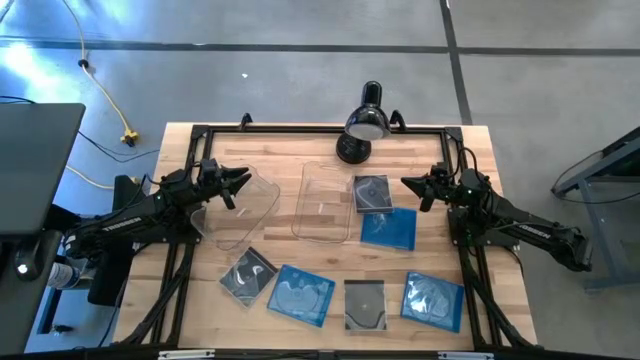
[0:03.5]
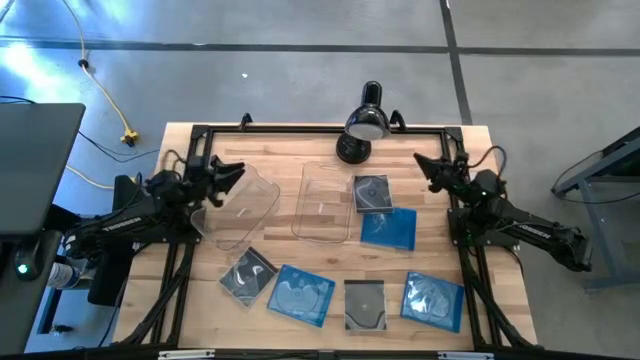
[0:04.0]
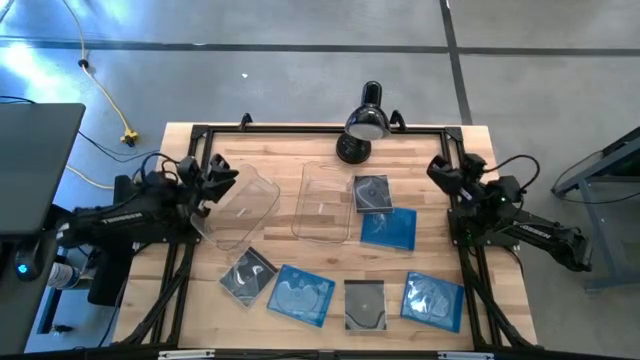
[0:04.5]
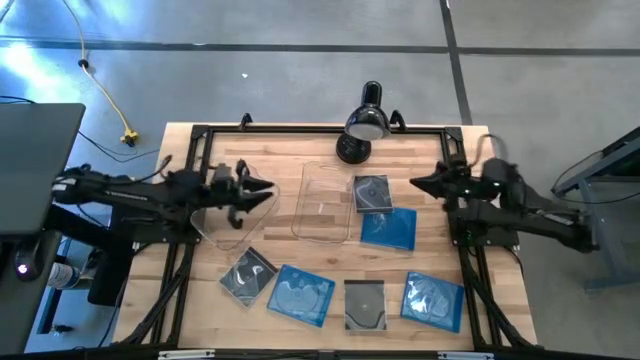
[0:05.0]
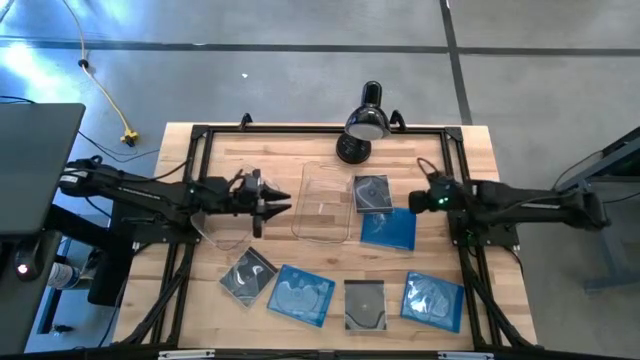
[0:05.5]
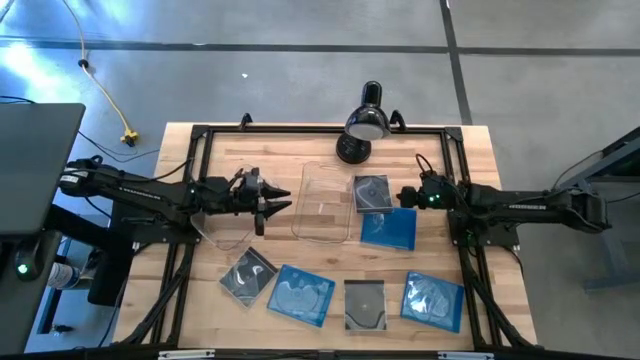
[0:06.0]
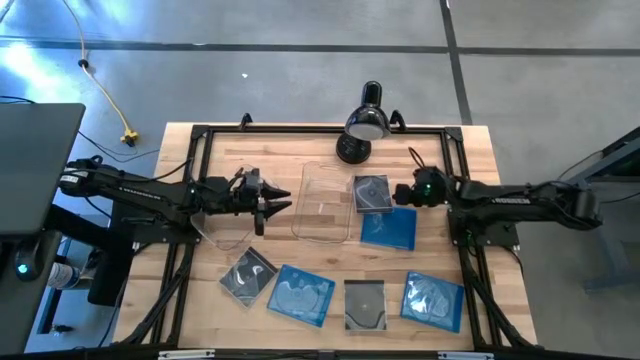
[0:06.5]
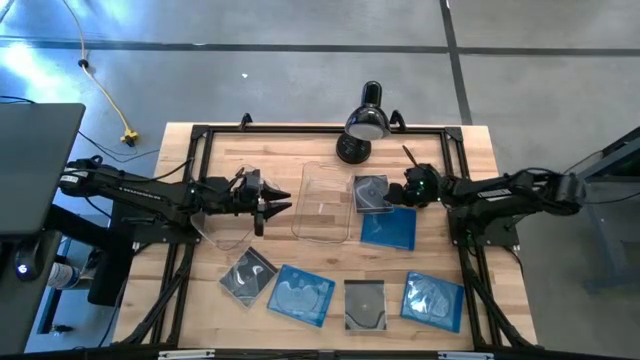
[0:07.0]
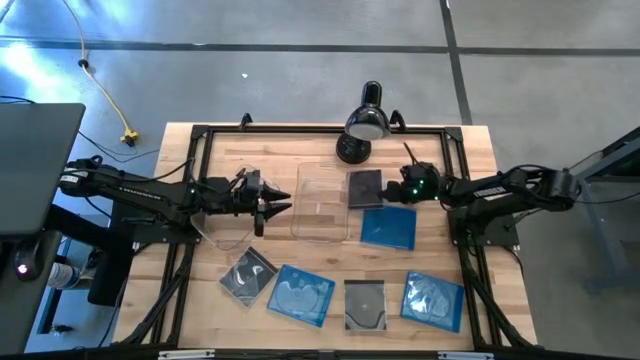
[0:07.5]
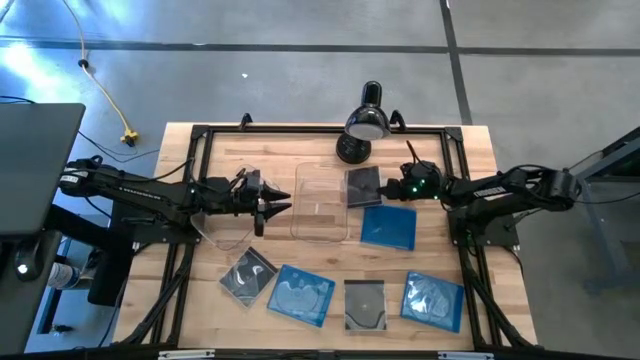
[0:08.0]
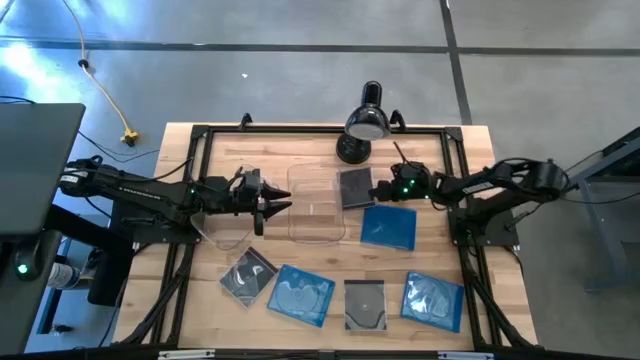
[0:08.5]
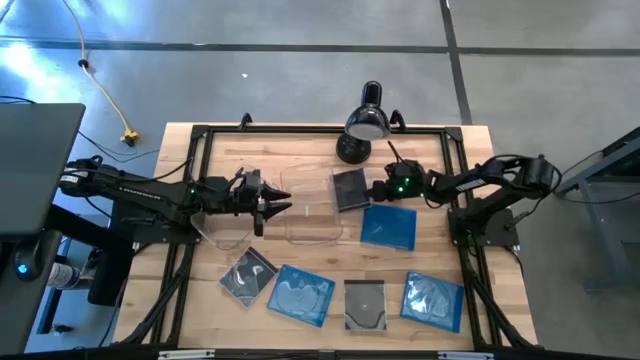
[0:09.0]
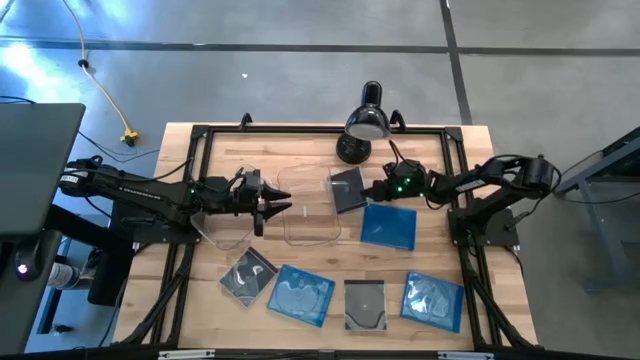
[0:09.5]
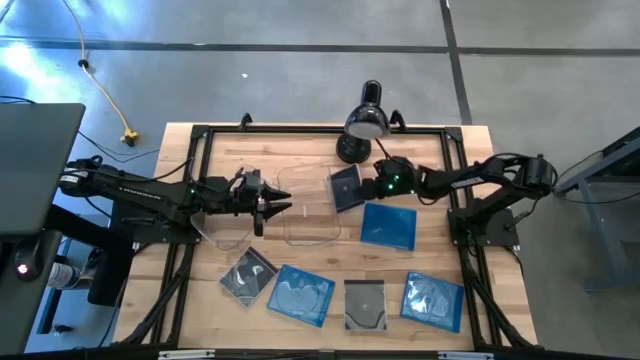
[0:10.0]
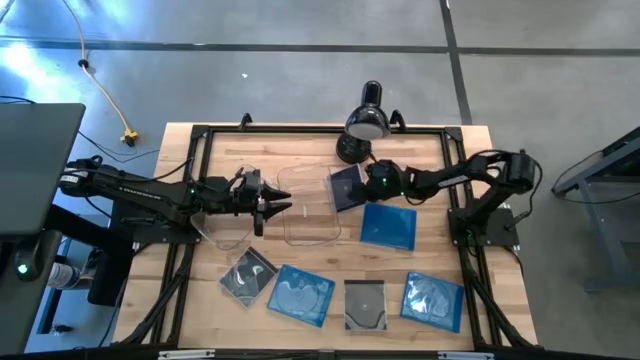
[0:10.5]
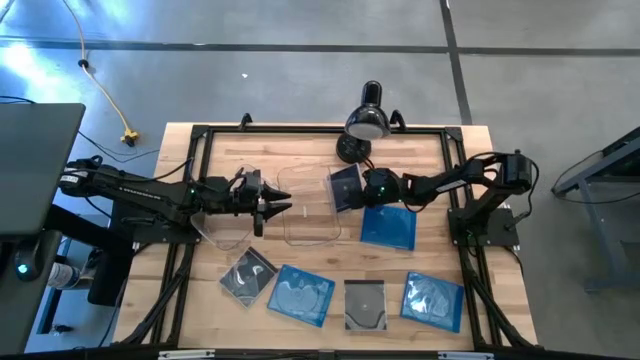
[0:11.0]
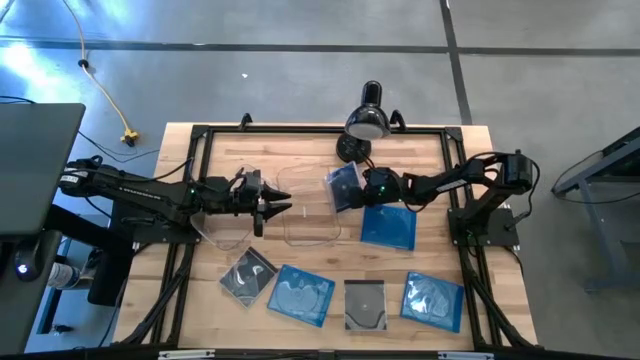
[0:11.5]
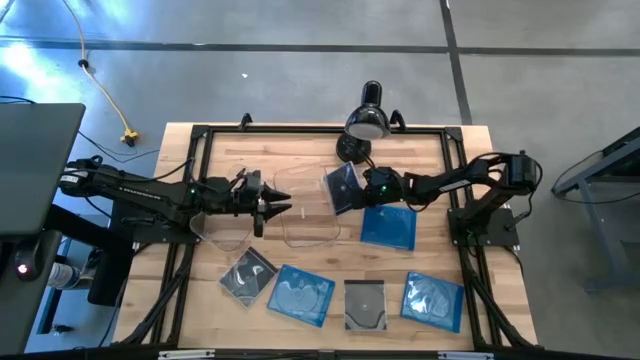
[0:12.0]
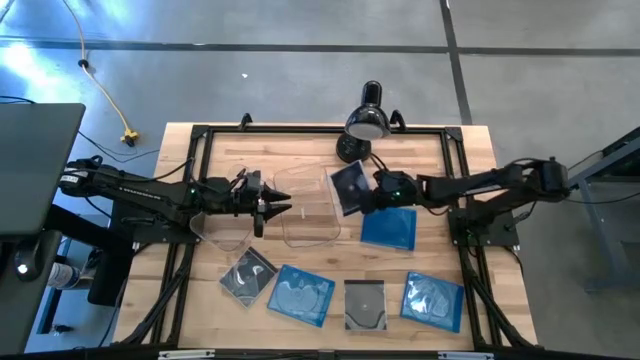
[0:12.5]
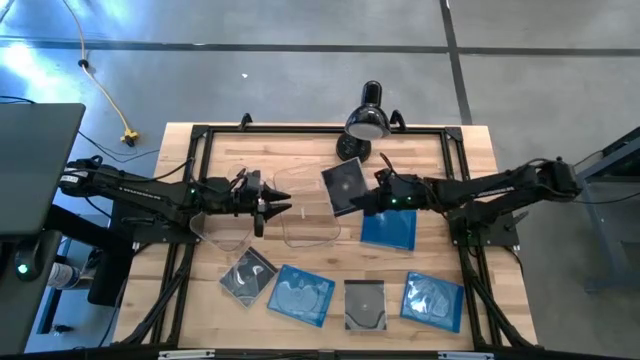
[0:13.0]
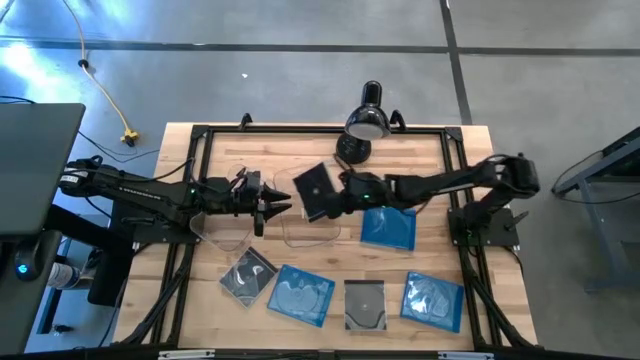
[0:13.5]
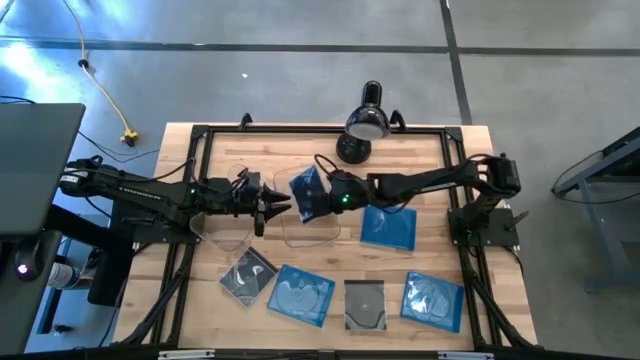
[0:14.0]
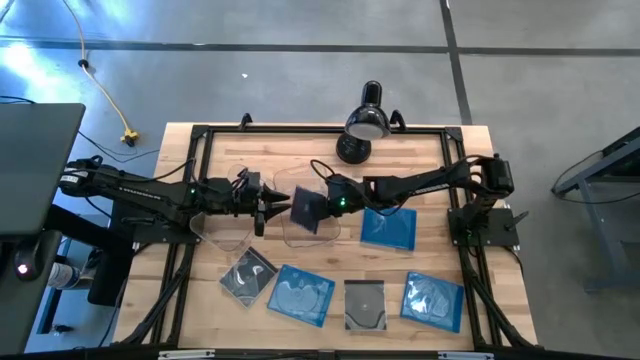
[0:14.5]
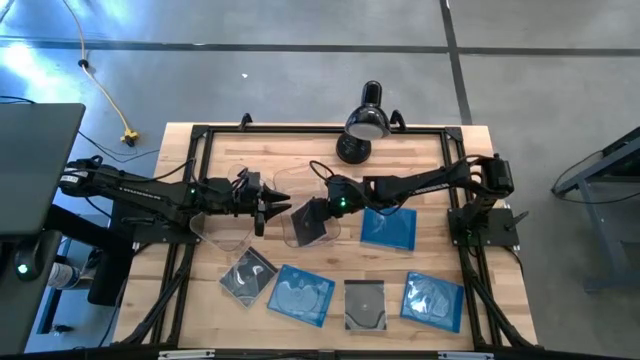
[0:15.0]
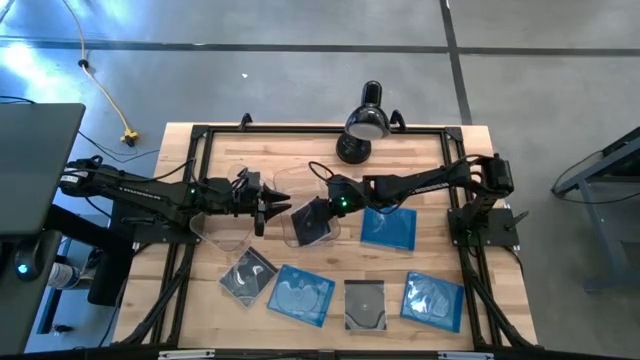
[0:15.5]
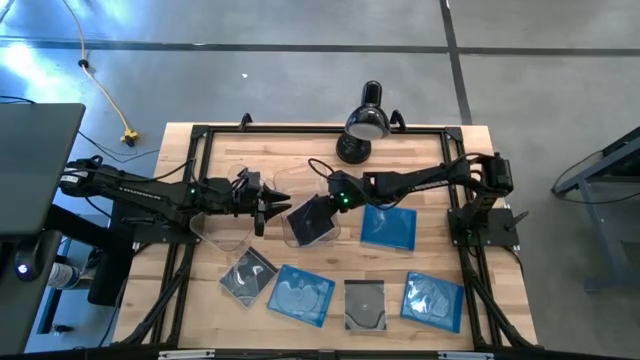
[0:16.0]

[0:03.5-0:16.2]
Task: Pick & place jewel cases by type
Put the top black CD case into the right transparent bin

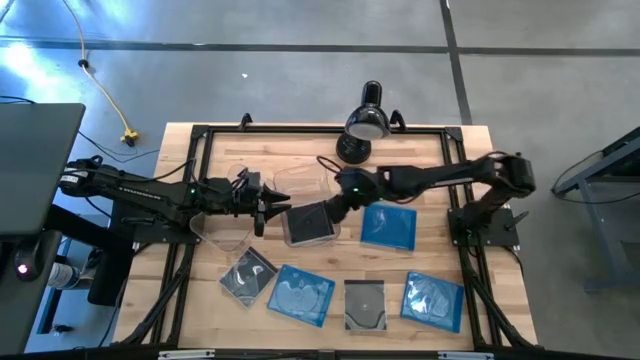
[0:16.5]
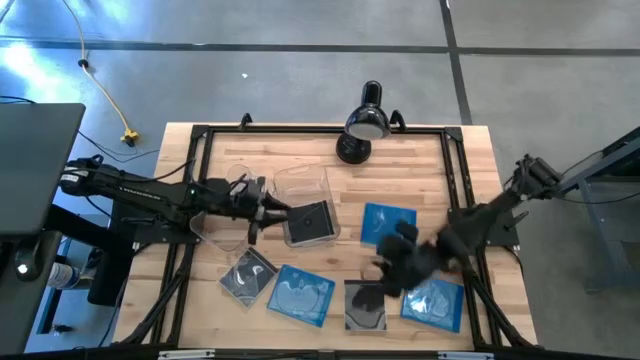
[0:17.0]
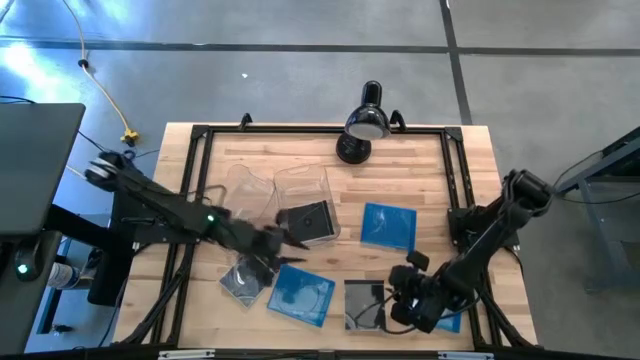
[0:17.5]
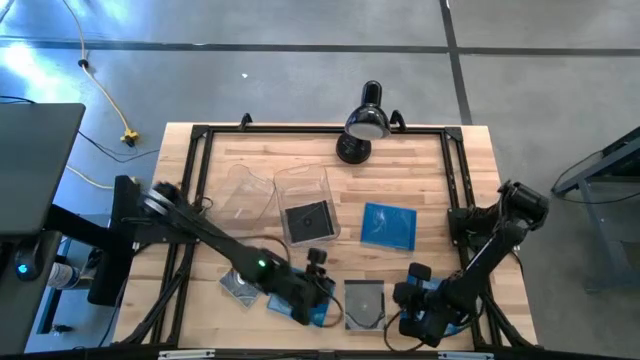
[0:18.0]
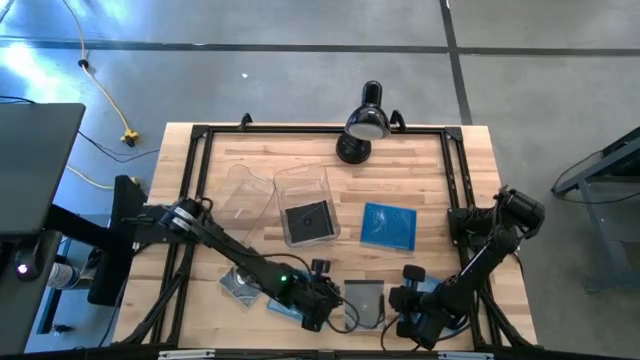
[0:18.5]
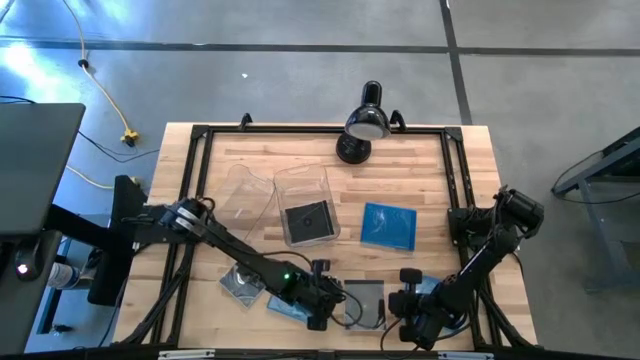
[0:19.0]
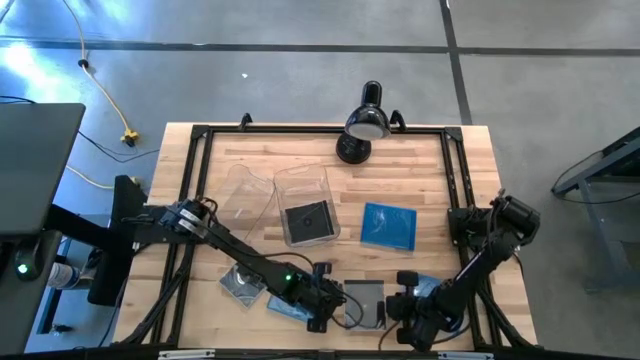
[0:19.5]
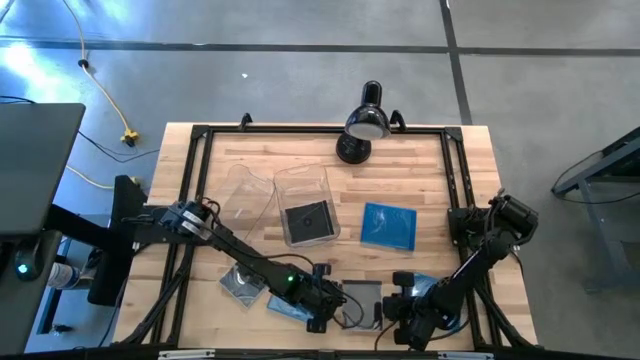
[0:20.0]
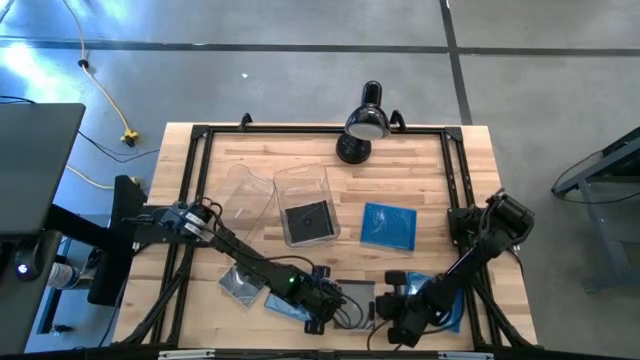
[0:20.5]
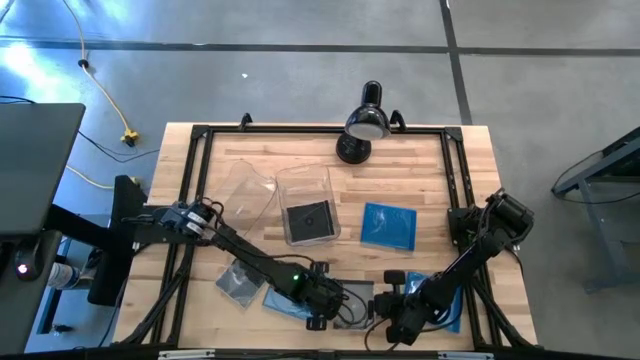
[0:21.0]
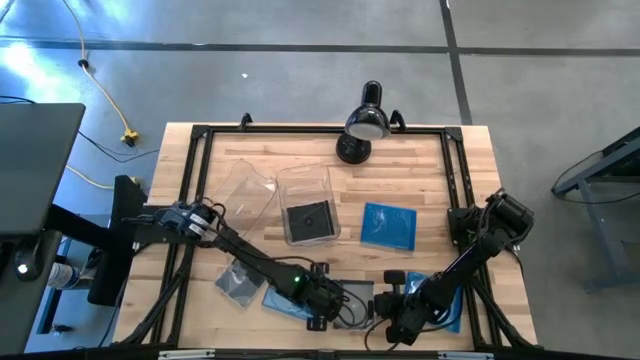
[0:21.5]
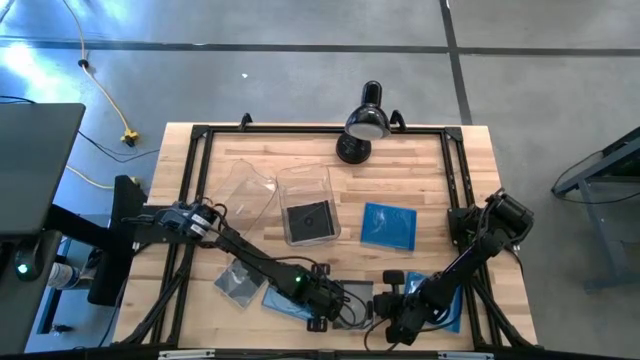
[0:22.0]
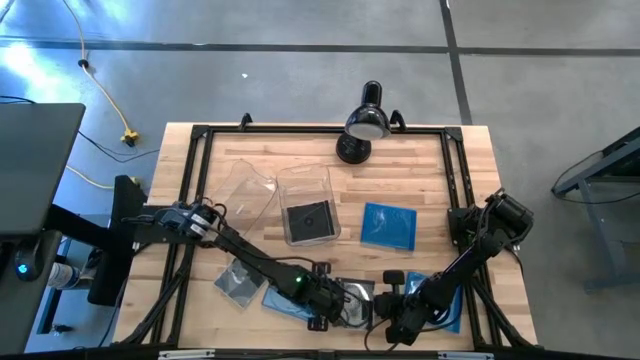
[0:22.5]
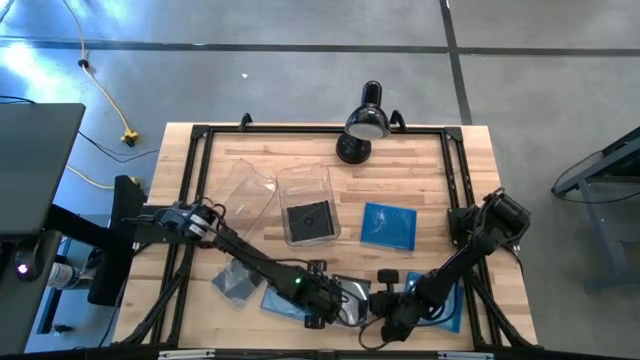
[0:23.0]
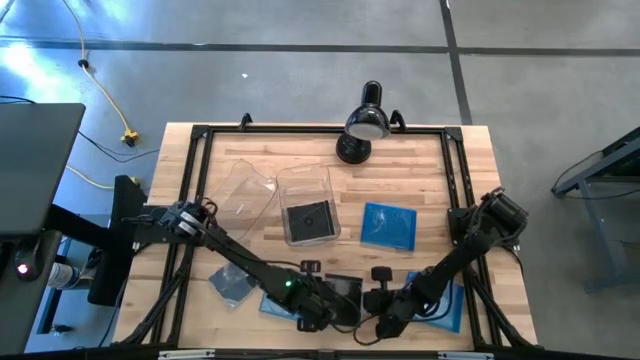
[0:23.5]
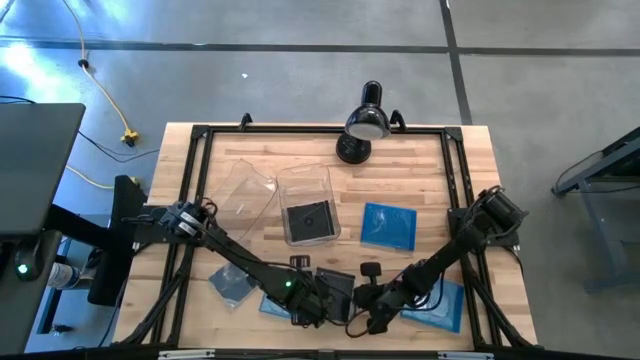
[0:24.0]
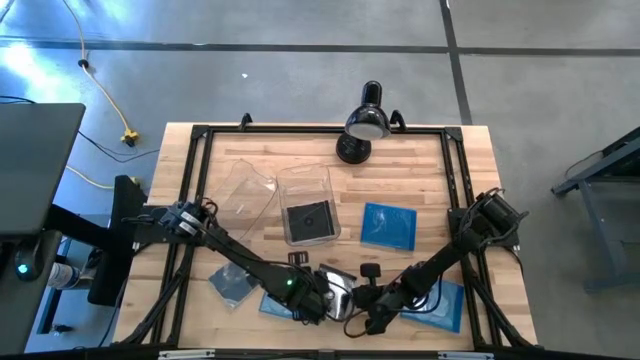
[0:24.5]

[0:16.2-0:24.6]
Adjust the right black CD case
